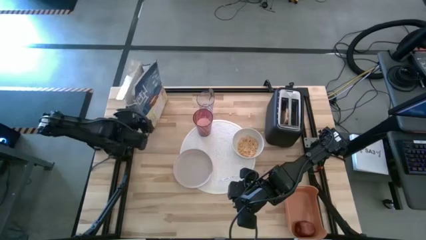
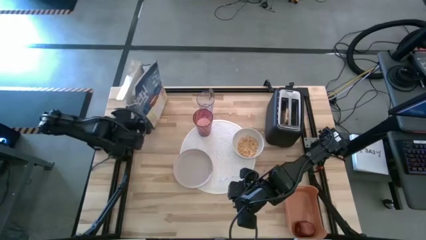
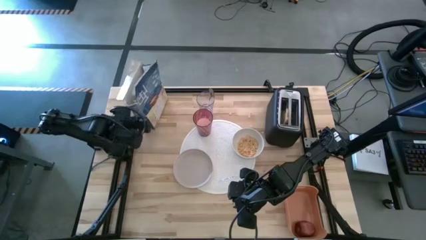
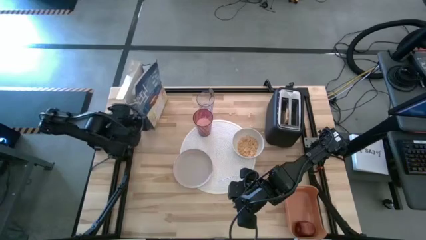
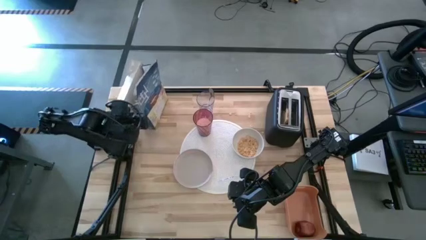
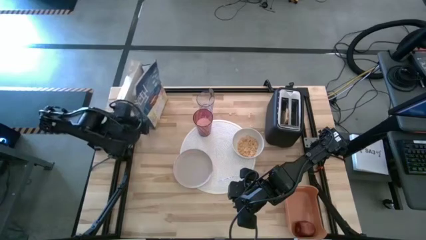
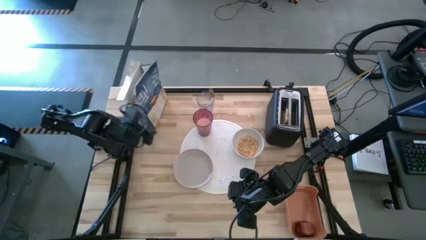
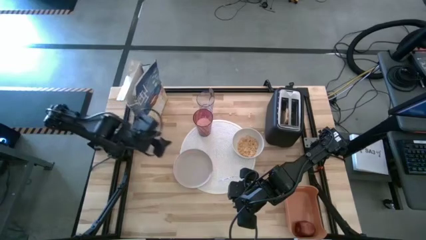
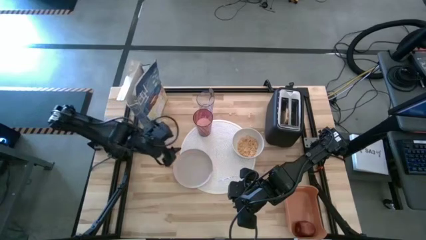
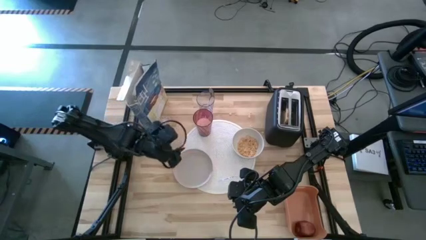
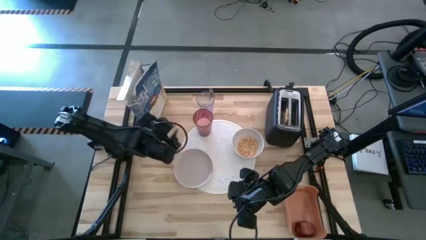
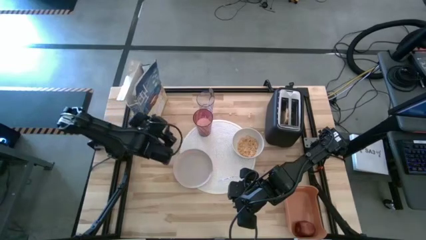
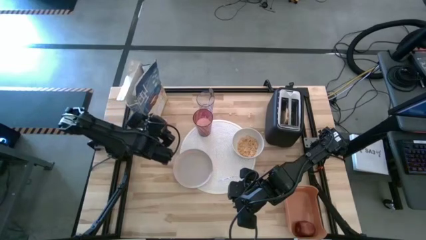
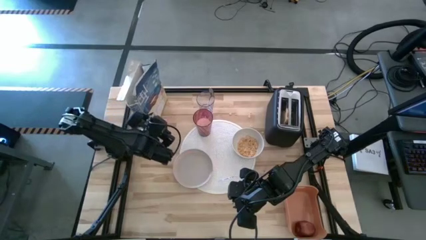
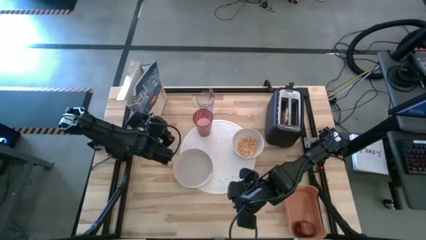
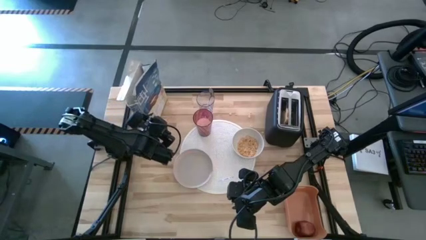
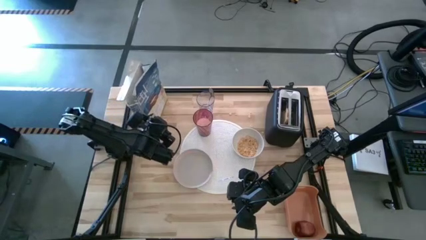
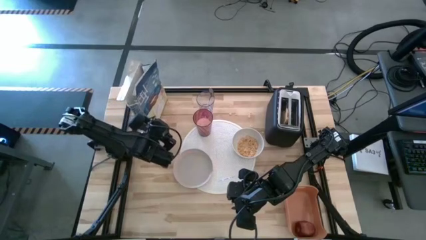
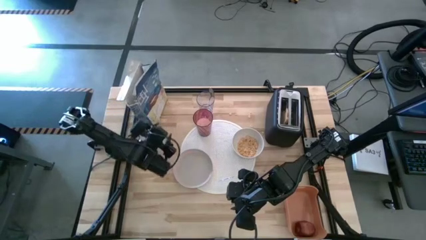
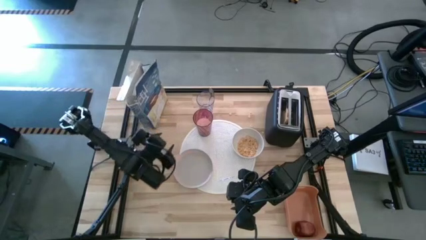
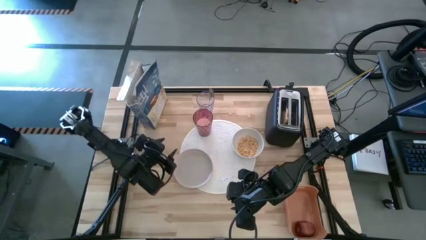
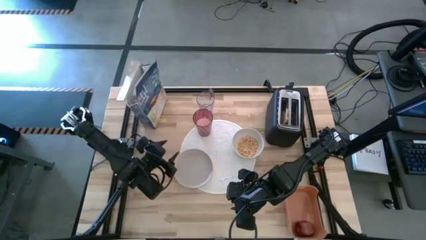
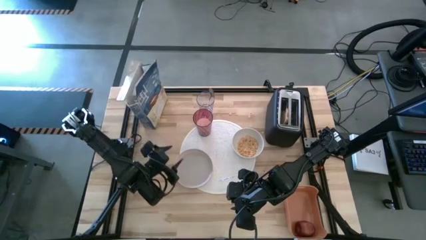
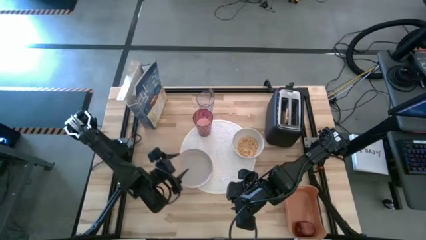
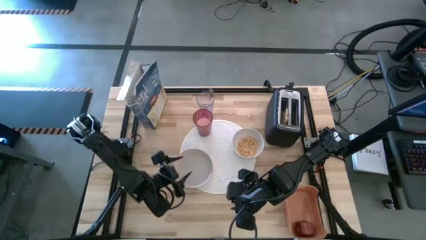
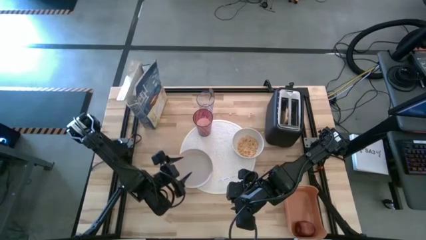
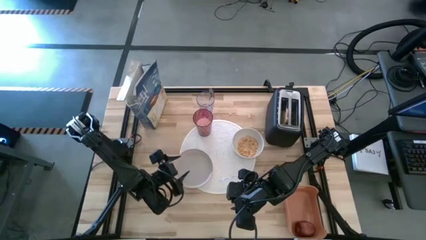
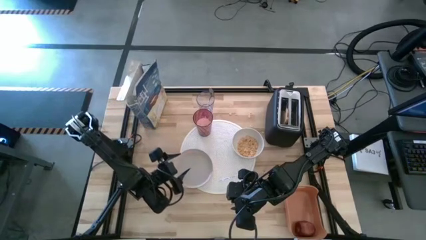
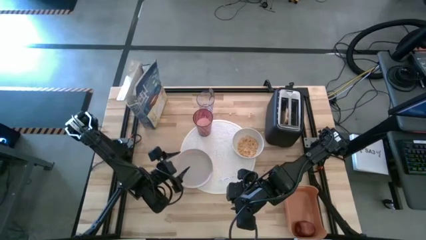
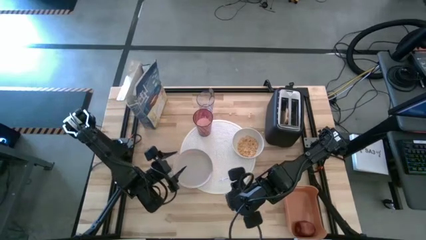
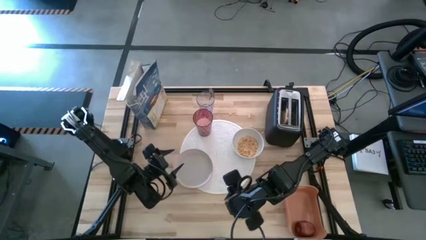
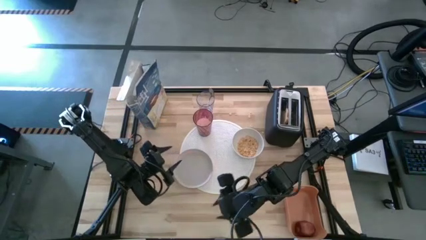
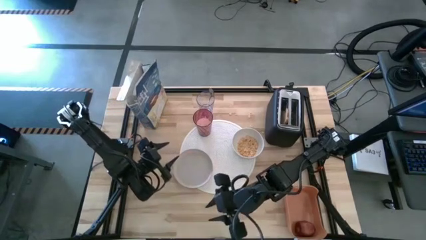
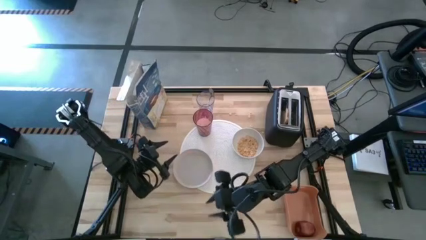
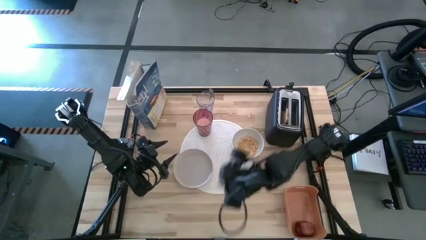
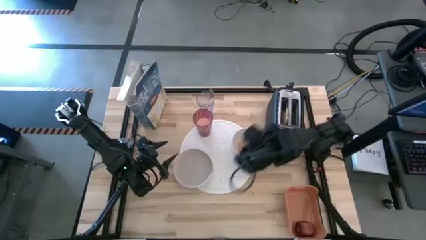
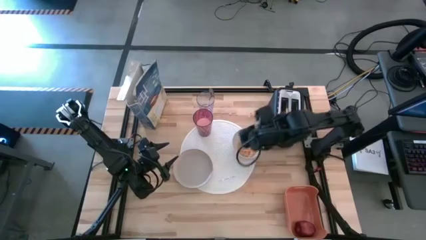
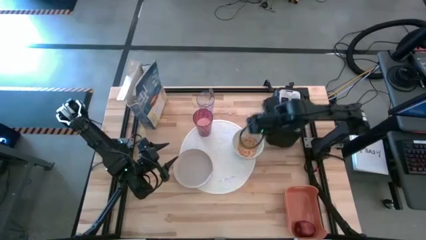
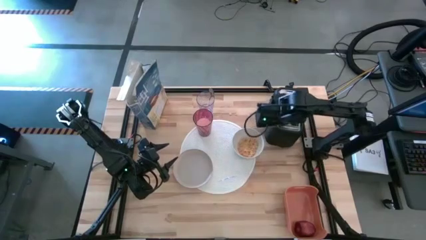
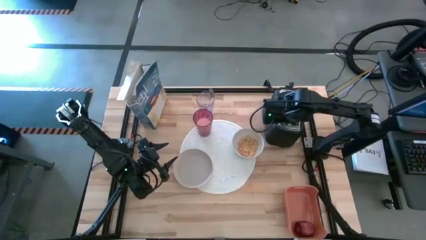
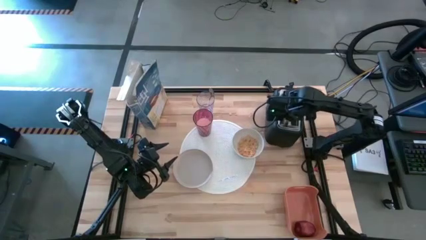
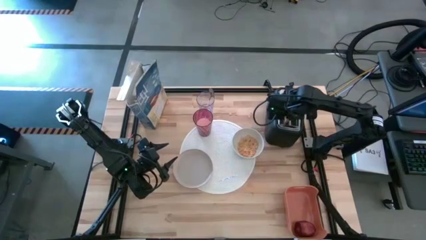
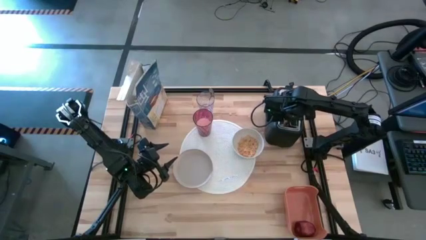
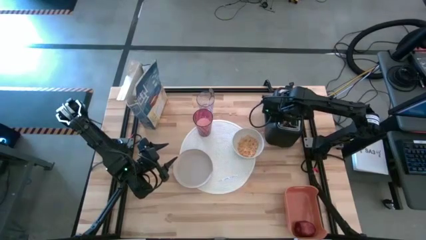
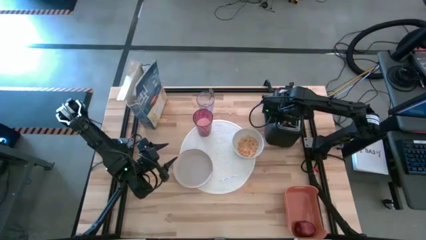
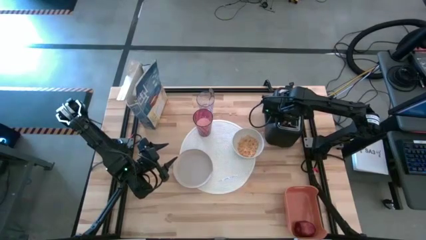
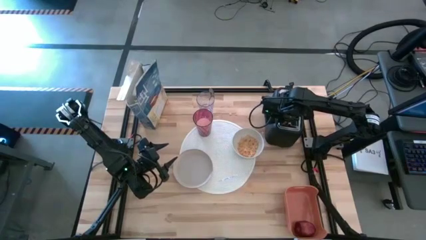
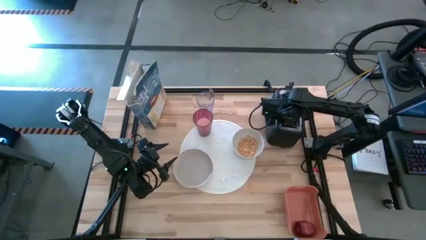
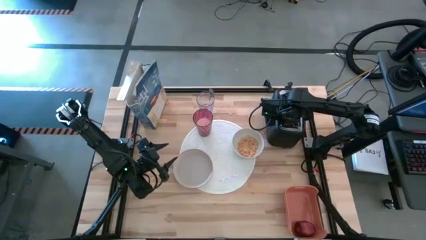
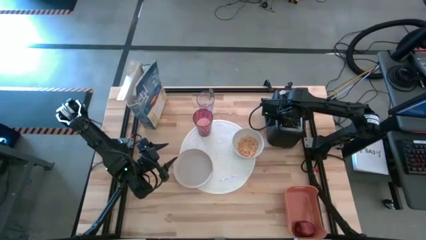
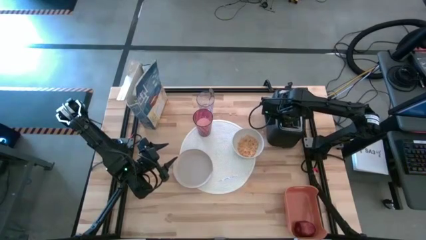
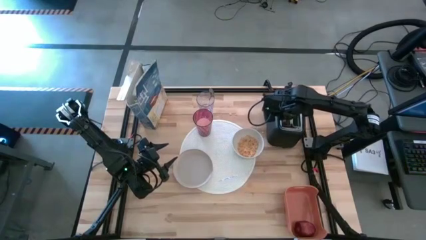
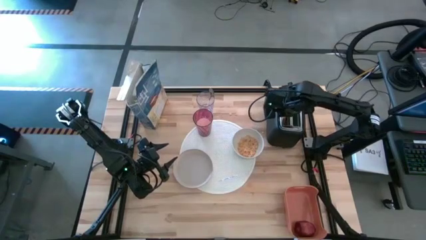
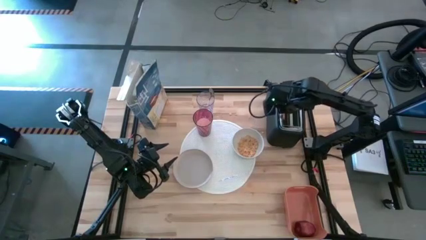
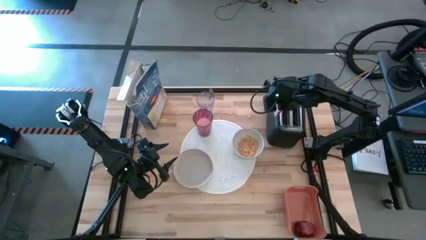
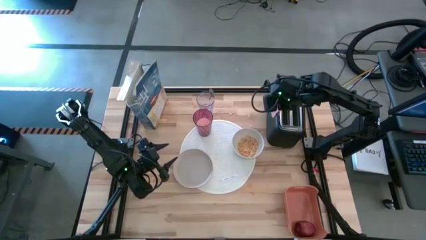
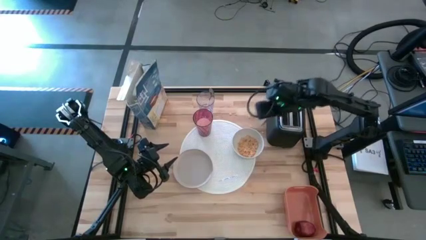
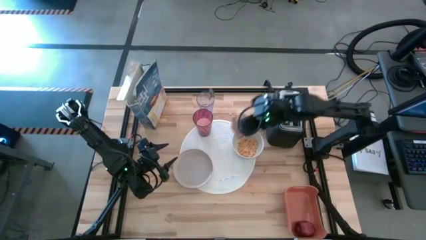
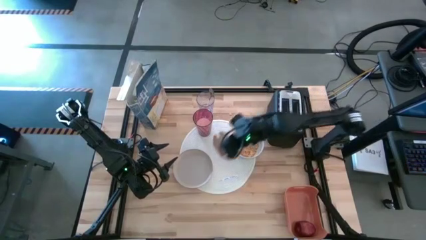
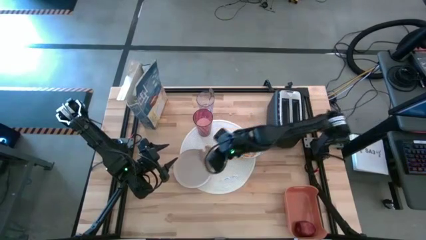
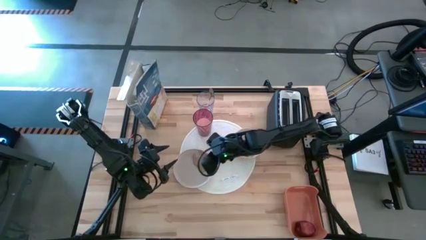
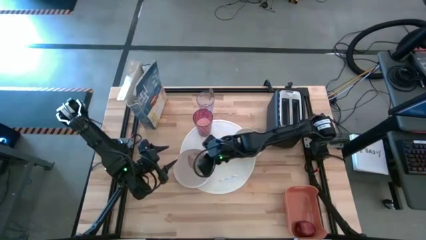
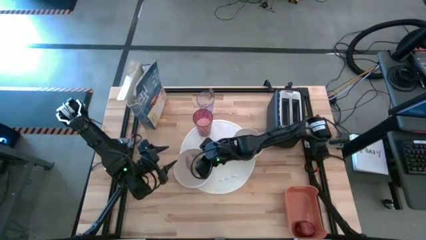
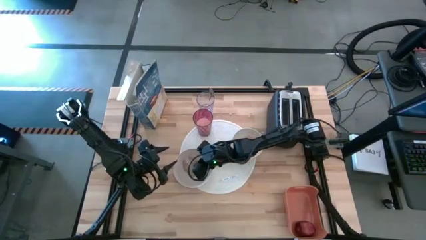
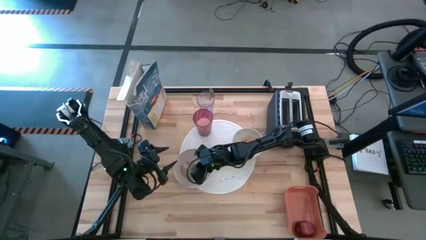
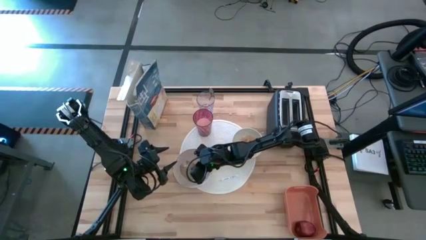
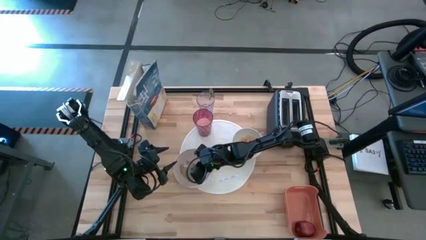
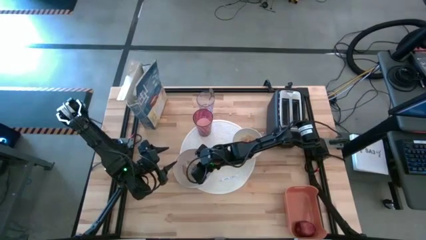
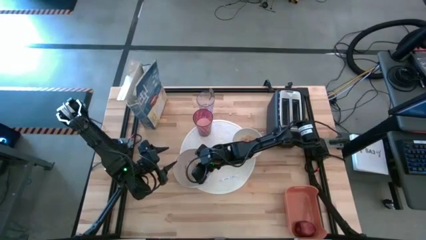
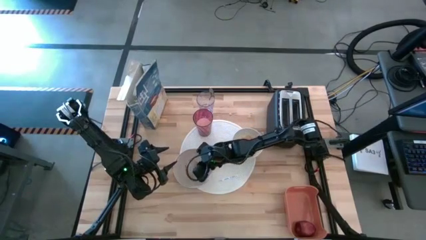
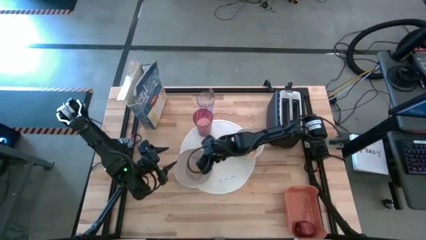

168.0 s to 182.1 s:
Task: Arrange a breakfast setting
Put the toasted bread from the oven on the peach plate

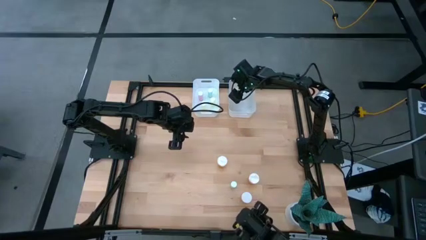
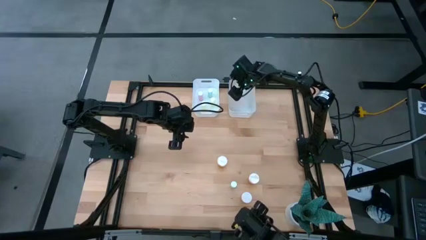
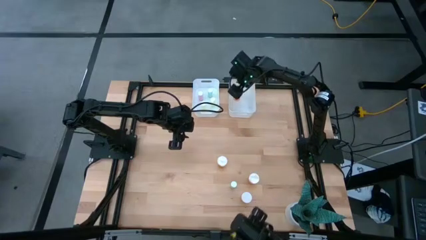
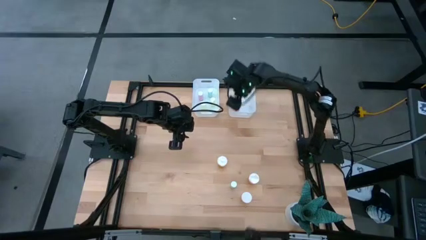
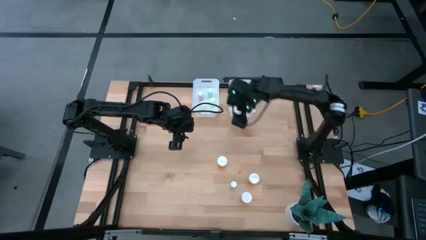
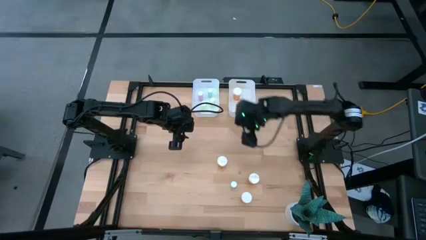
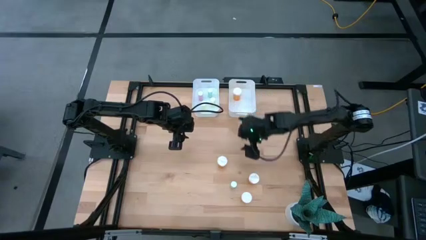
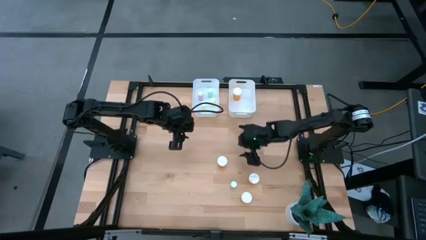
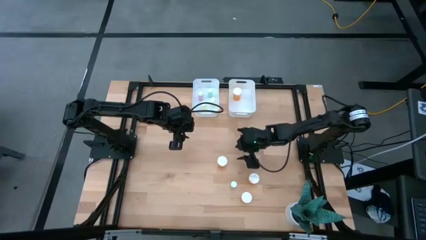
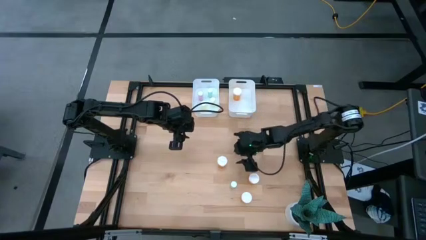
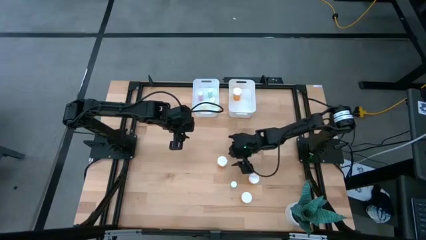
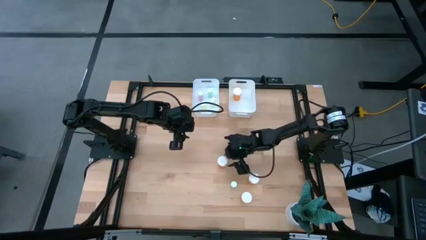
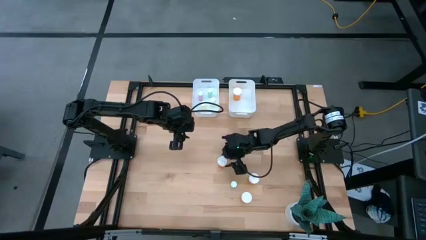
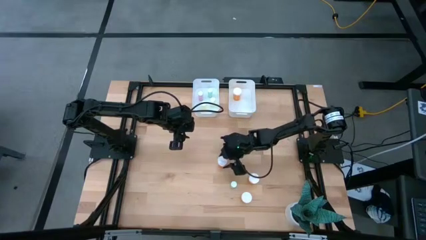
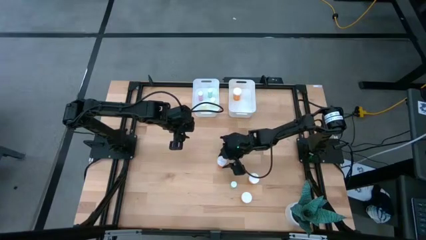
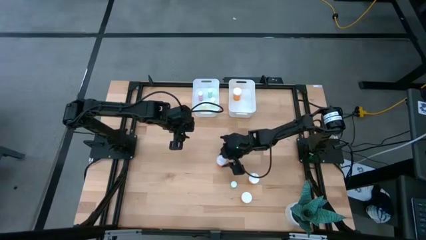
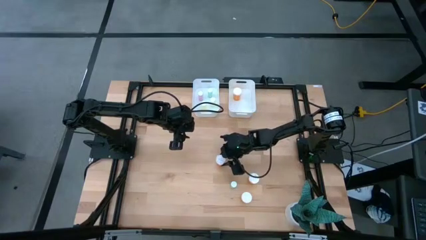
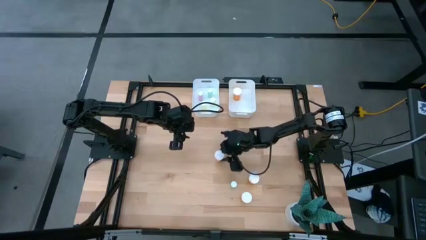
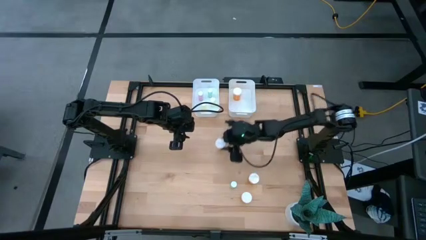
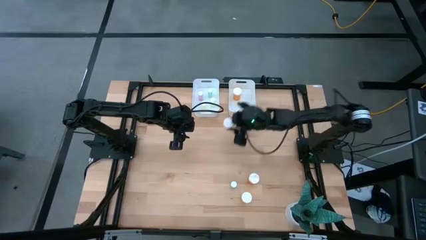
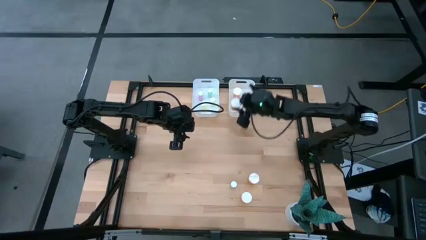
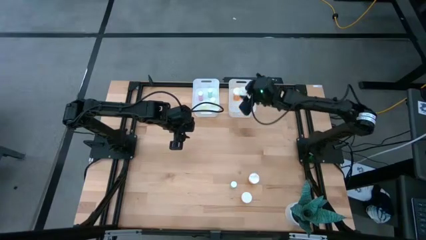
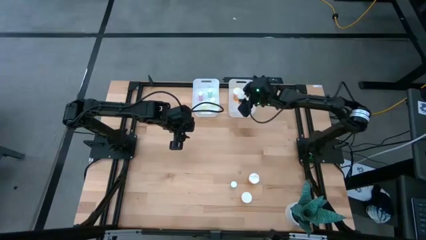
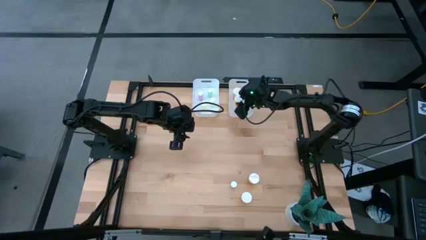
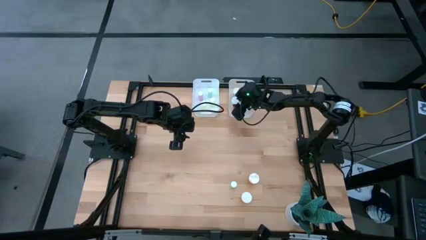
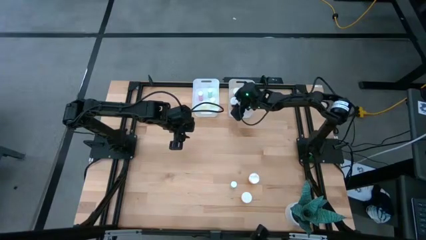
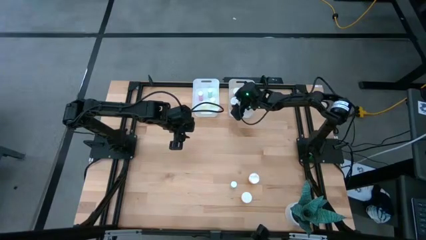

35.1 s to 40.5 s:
Task: Pick and place medicine bottles into bin by pill shape (circle, oval)
Put the orange capsule bottle into the white right bin
